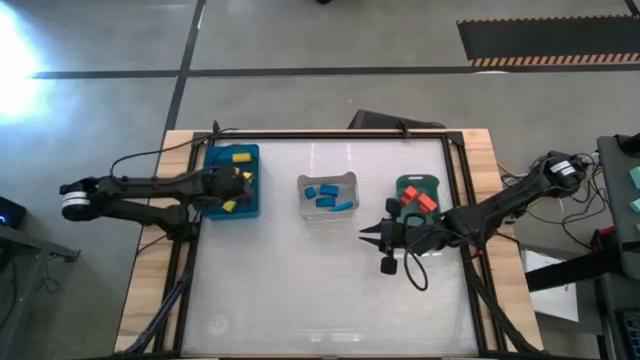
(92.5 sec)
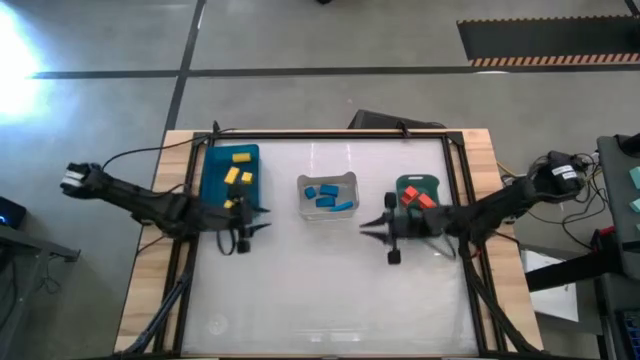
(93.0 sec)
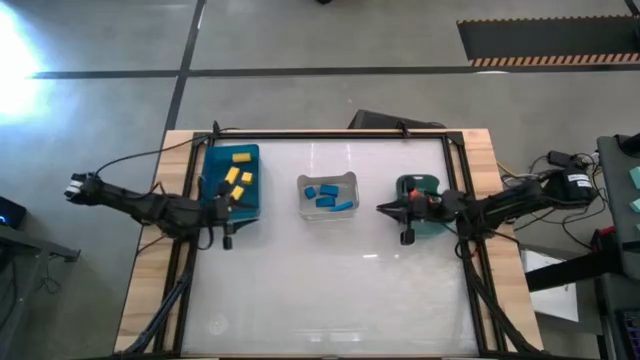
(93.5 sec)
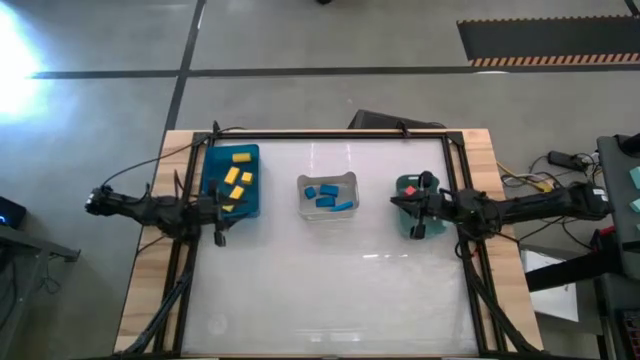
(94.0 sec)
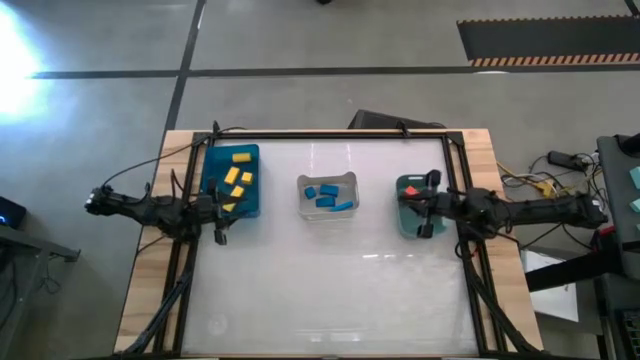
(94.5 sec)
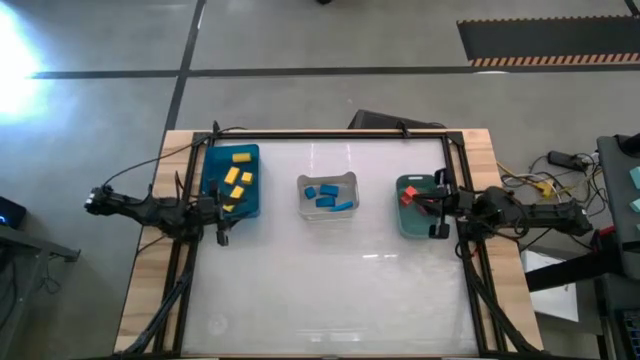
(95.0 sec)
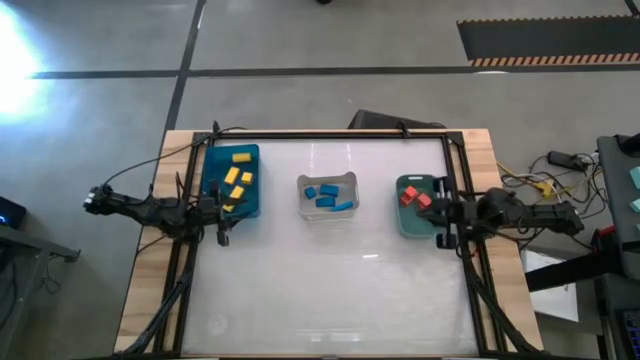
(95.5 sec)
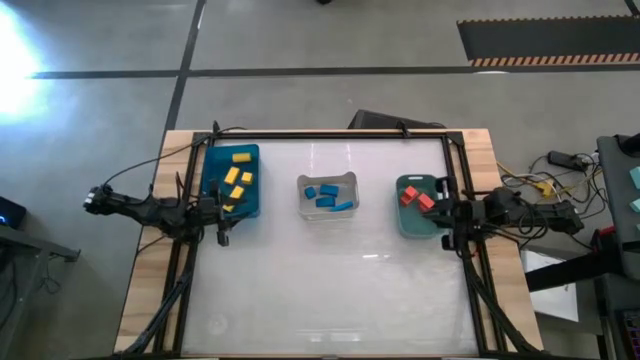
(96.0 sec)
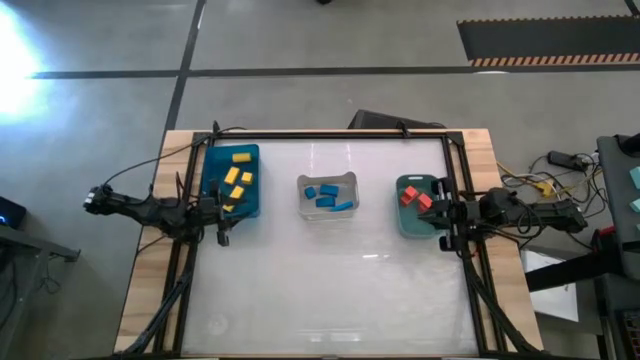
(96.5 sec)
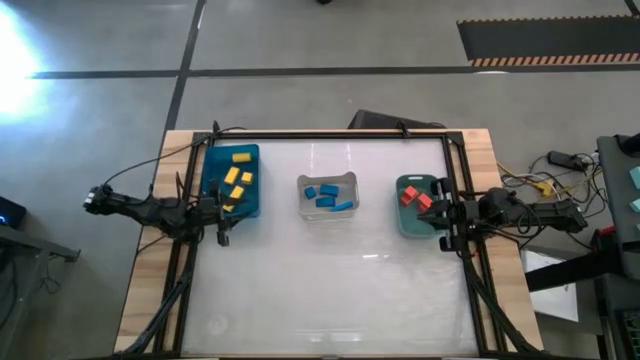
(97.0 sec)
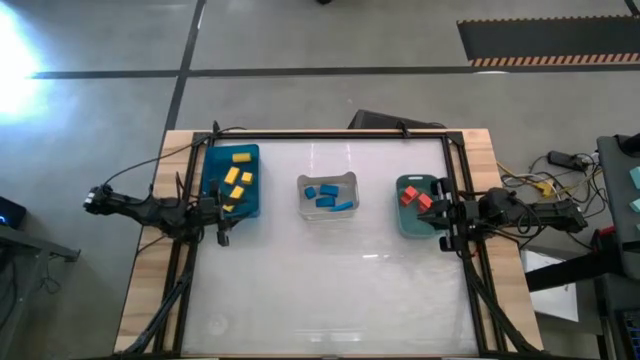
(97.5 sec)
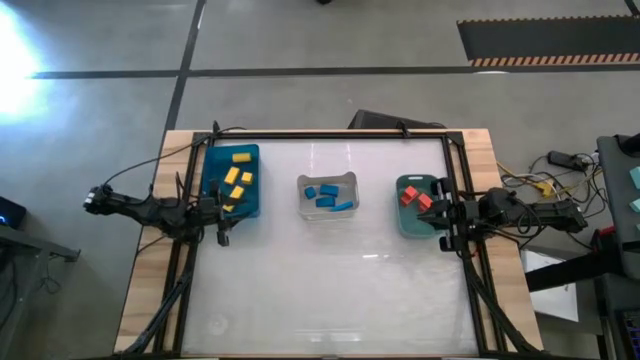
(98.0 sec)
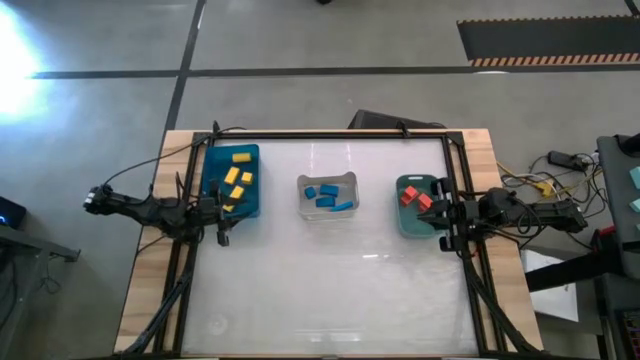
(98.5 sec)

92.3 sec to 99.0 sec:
Task: Sort & place blocks by color
Return to Home Position

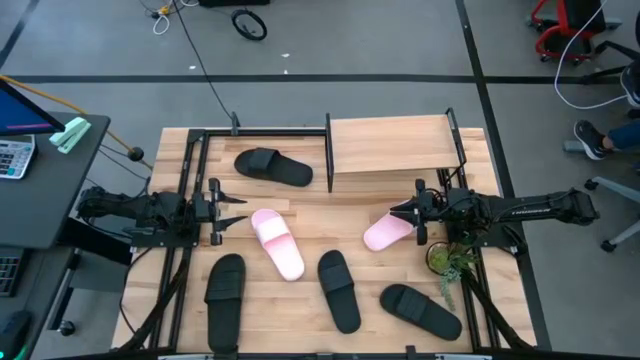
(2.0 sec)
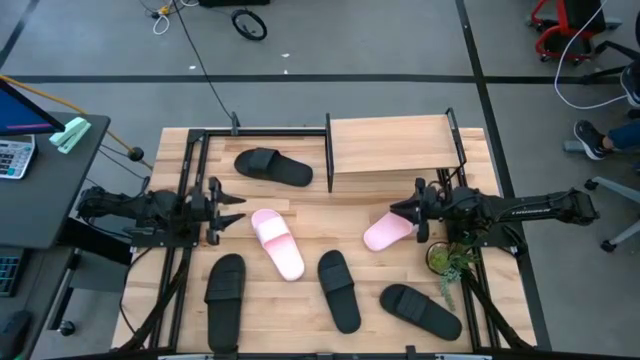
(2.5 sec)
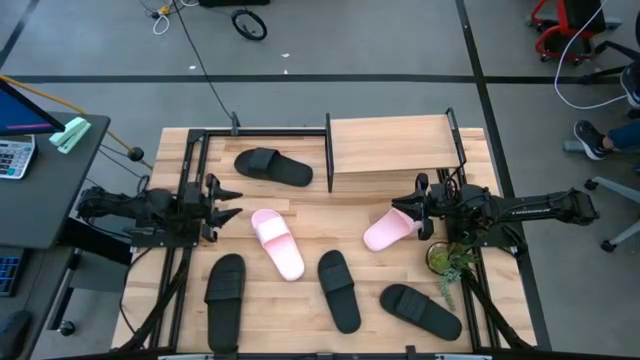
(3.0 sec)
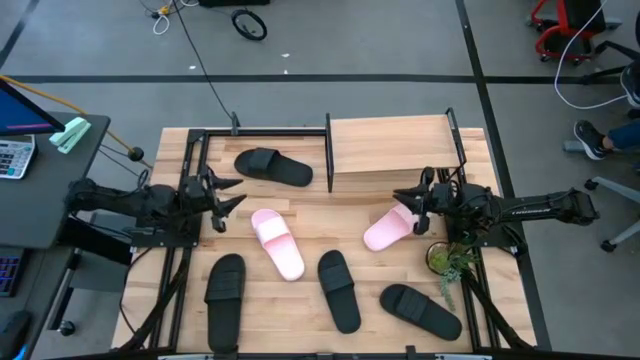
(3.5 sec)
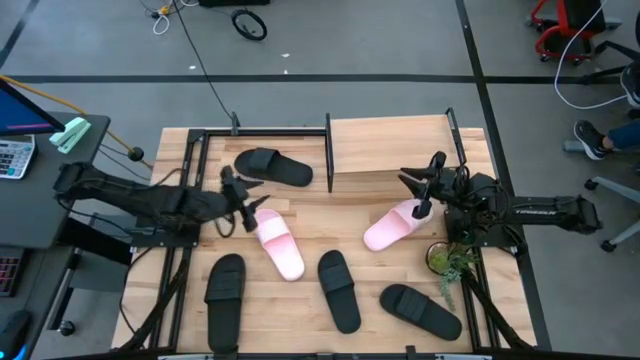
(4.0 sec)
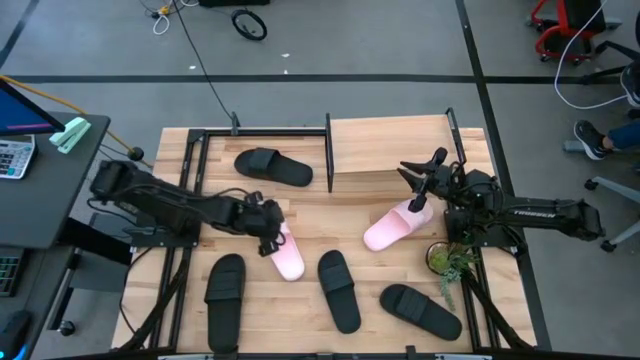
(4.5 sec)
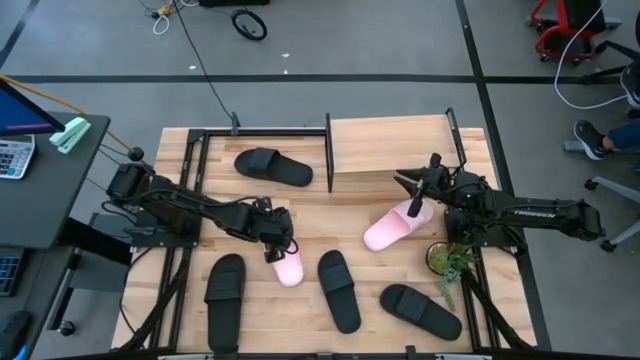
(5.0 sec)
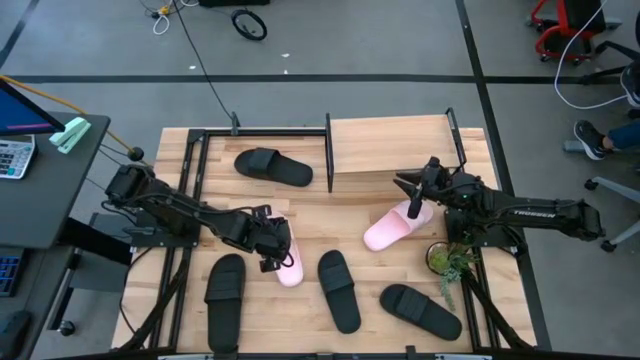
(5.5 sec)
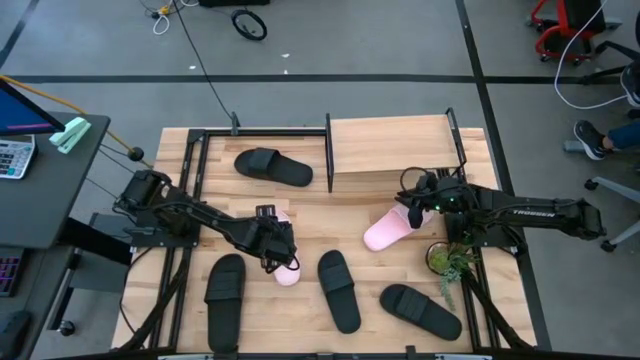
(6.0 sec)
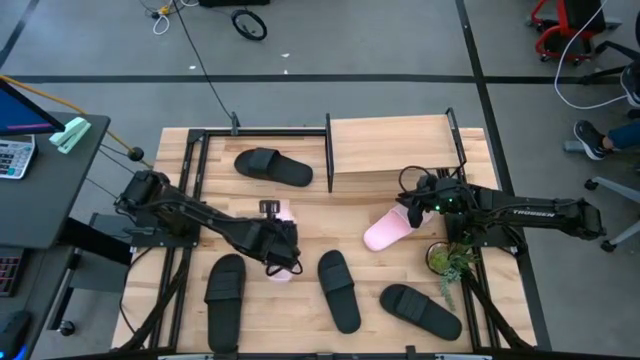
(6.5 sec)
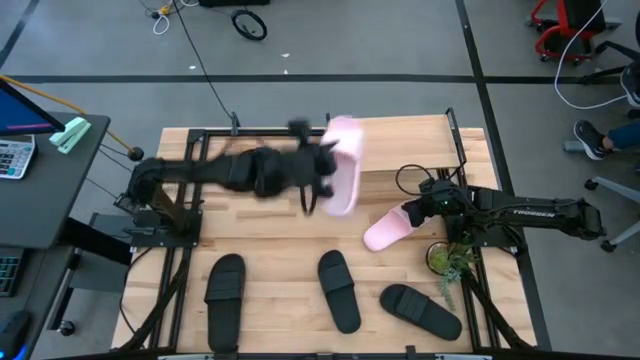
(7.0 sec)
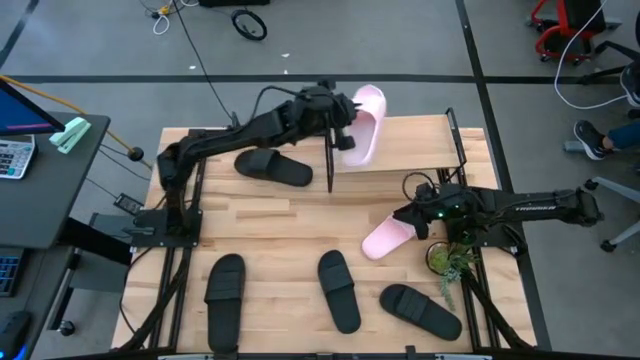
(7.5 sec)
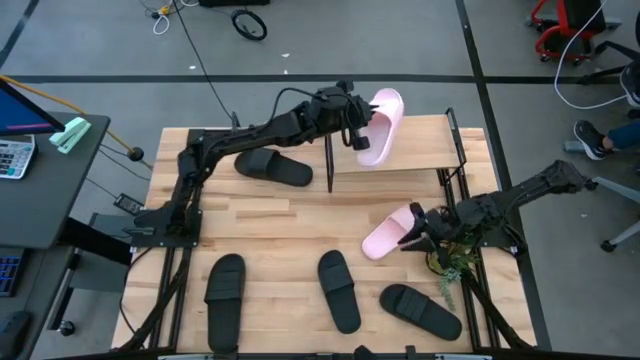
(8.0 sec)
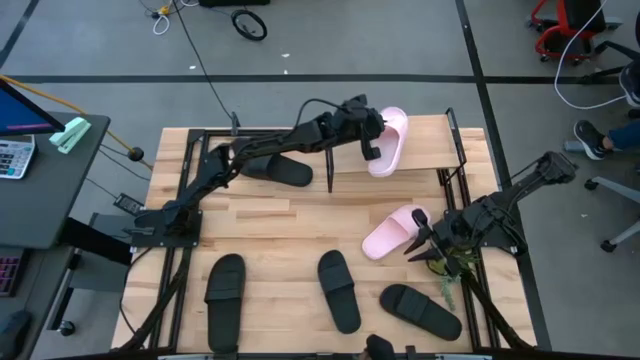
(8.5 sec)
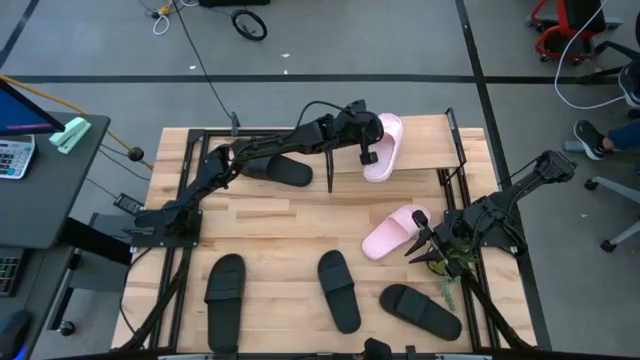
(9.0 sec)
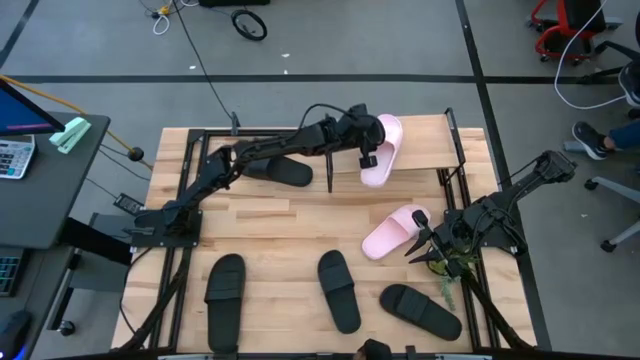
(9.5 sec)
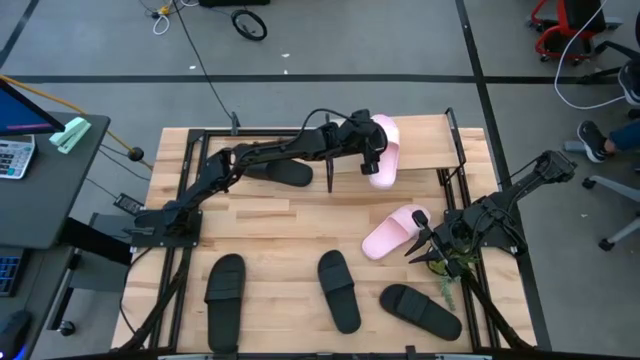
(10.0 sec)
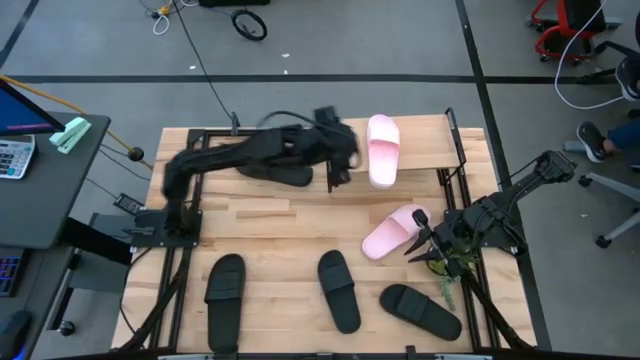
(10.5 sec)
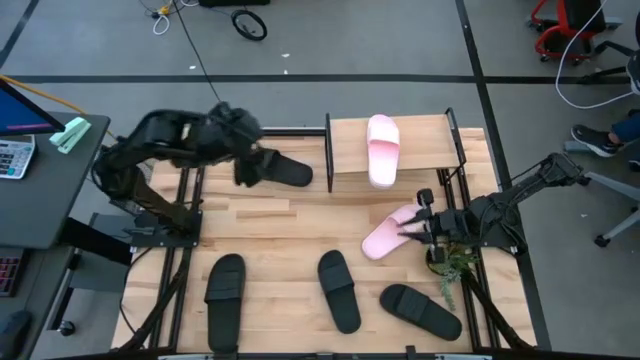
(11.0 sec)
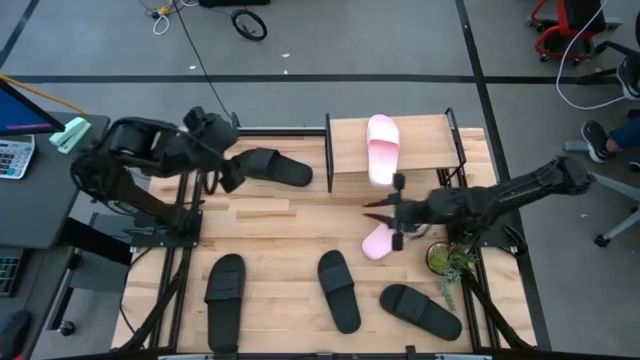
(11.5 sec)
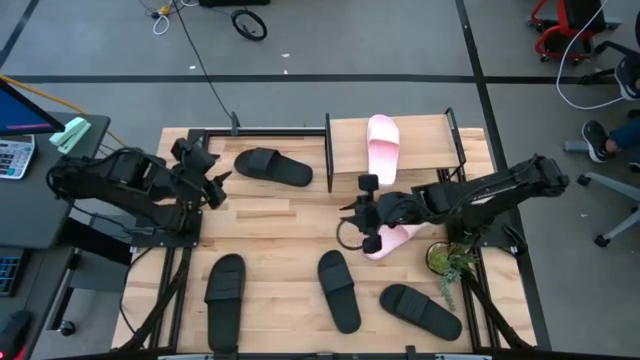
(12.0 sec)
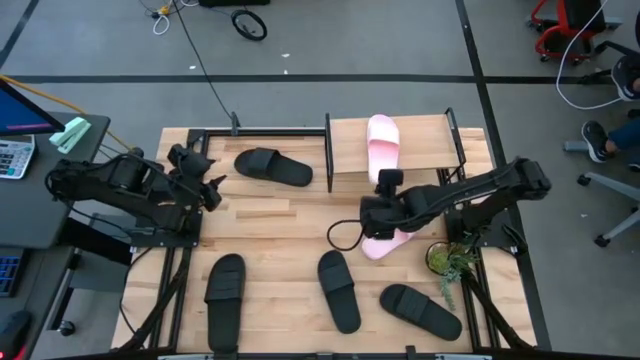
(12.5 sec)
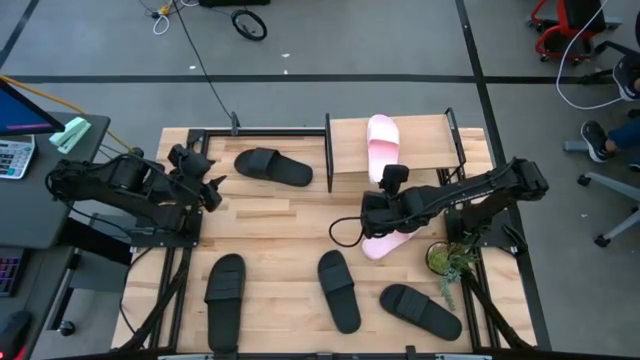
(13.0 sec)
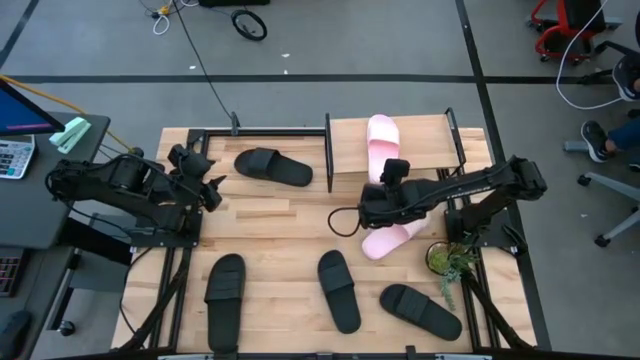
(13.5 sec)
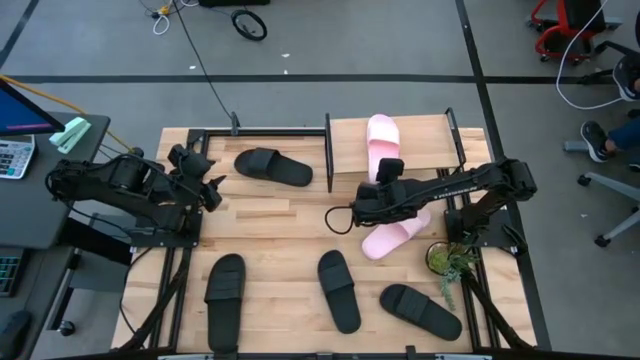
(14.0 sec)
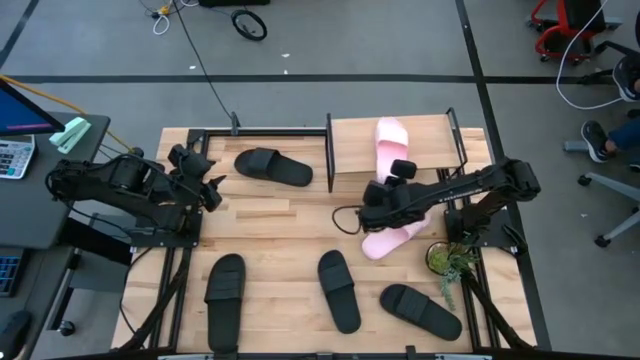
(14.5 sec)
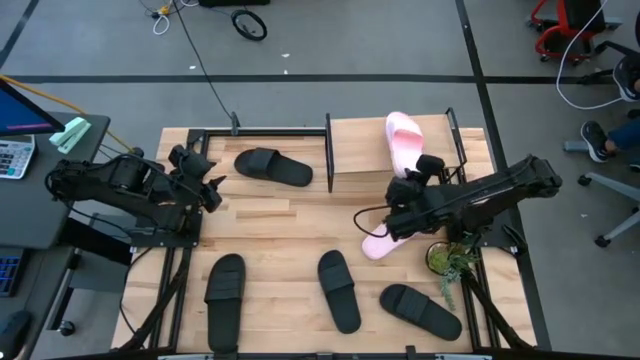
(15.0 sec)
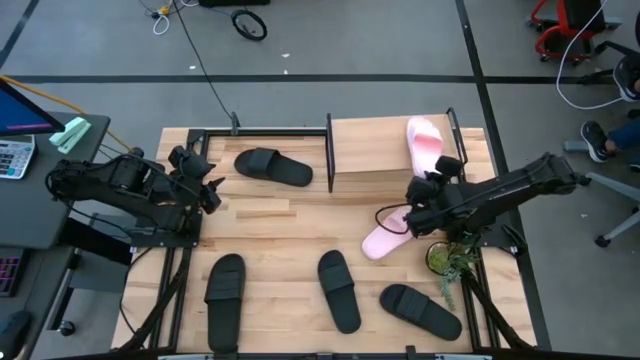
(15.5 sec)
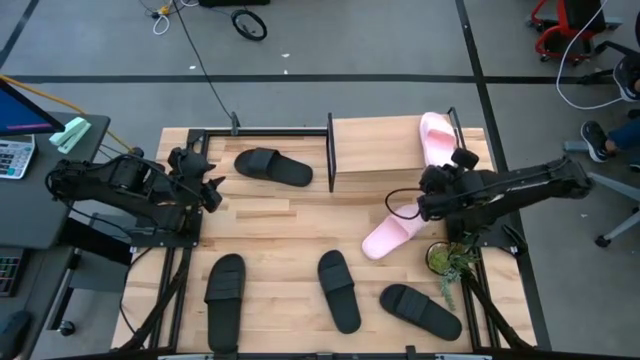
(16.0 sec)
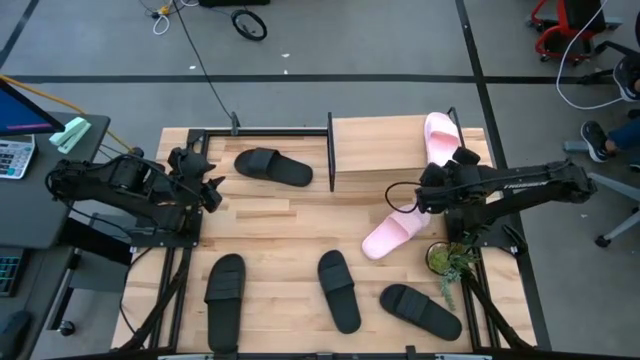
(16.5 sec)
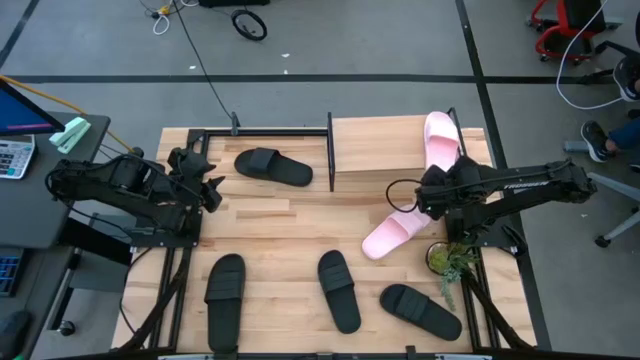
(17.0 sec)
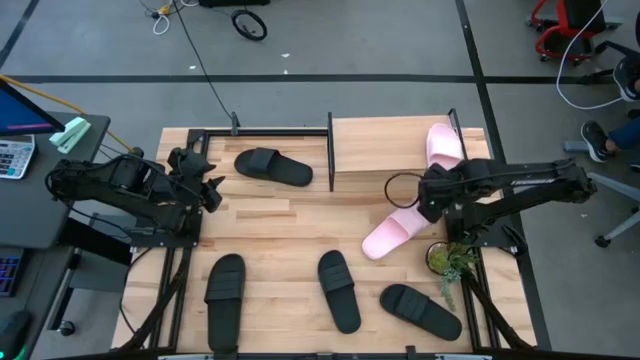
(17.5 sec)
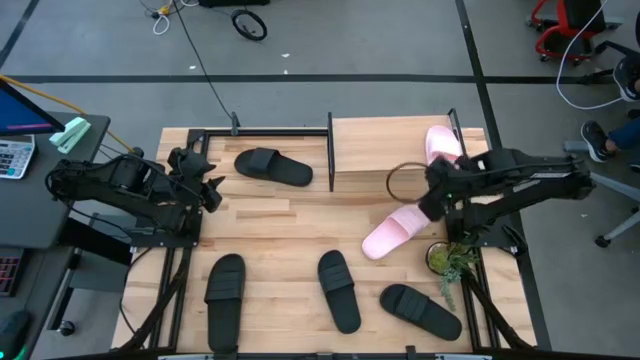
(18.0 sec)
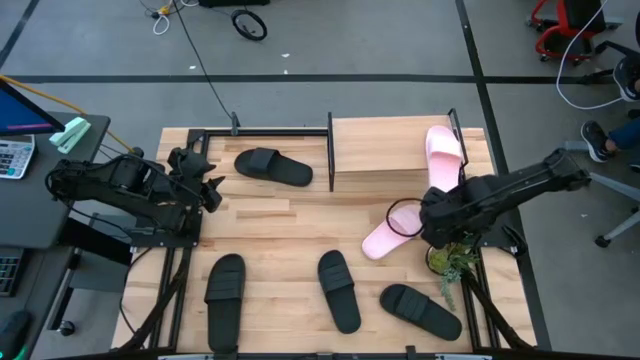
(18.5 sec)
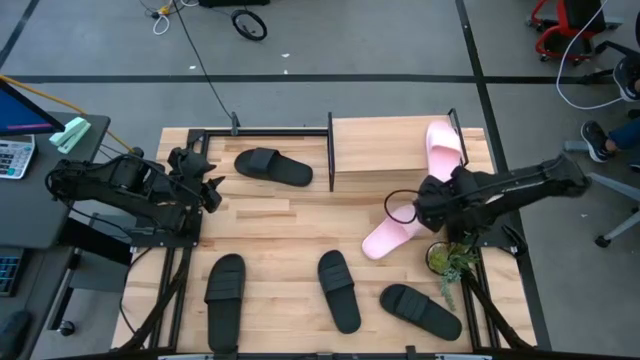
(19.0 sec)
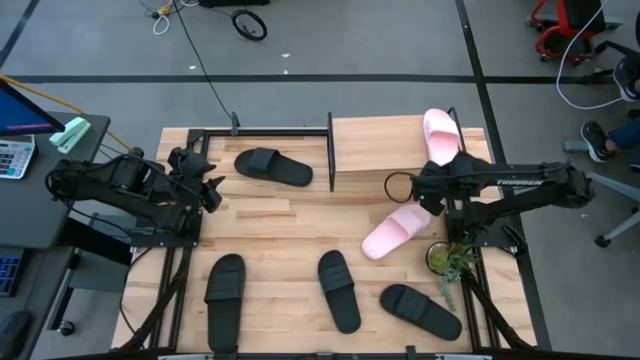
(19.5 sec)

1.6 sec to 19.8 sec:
Task: Pick and place slides into the shelf
Put the left pink slide on the shelf
